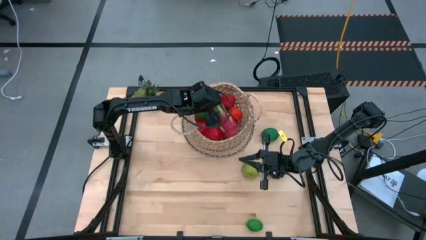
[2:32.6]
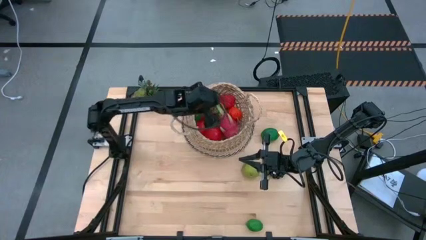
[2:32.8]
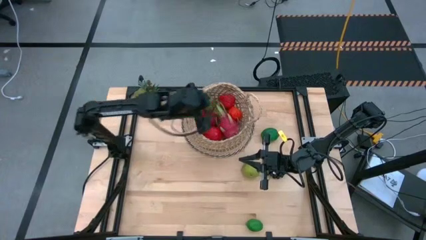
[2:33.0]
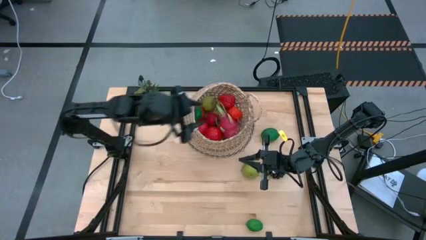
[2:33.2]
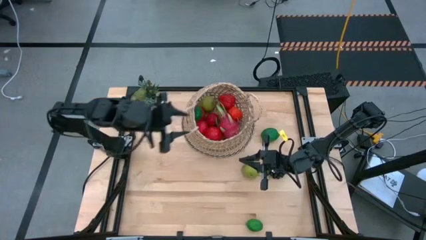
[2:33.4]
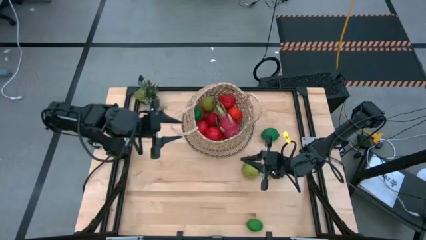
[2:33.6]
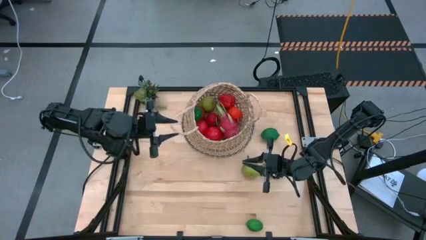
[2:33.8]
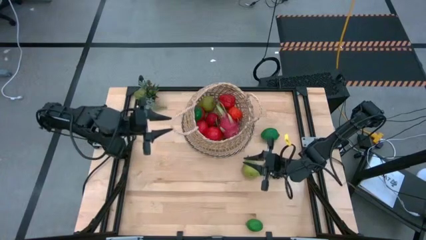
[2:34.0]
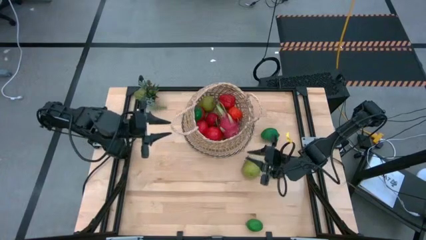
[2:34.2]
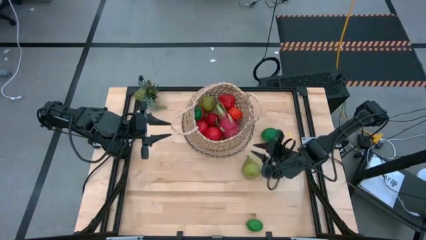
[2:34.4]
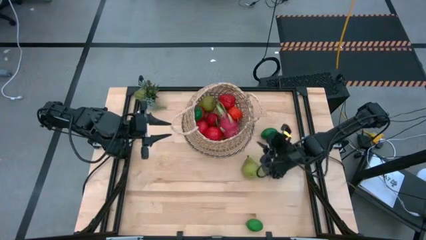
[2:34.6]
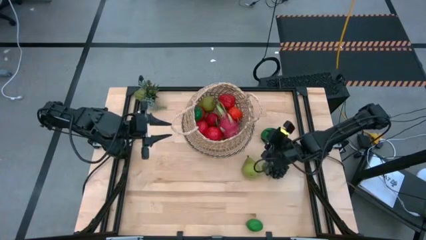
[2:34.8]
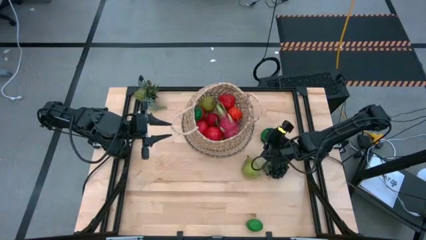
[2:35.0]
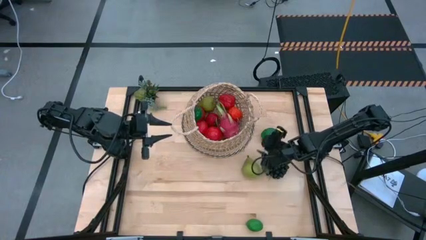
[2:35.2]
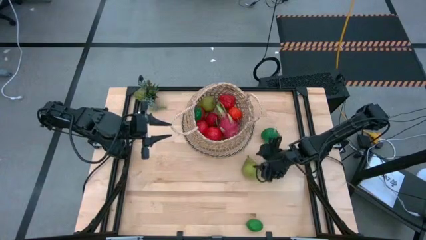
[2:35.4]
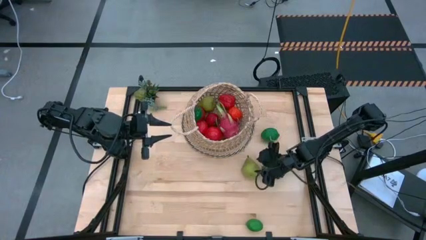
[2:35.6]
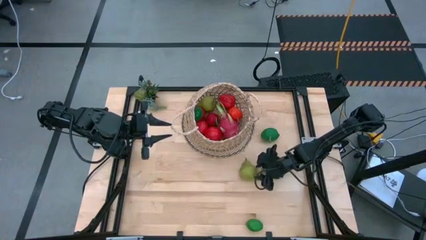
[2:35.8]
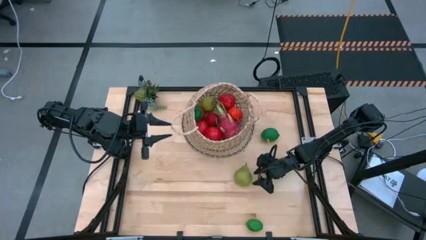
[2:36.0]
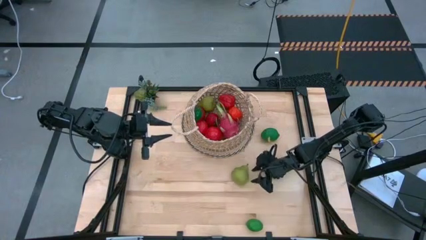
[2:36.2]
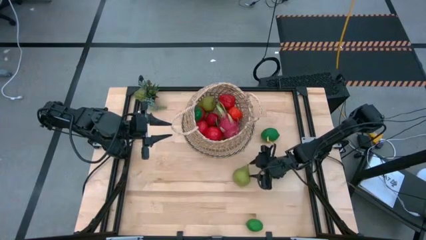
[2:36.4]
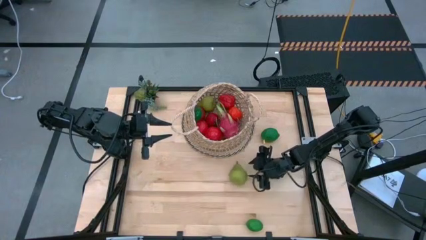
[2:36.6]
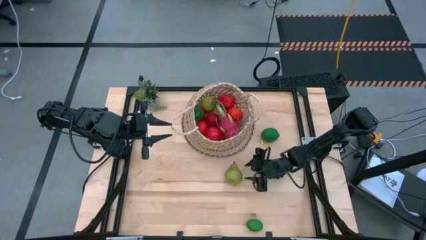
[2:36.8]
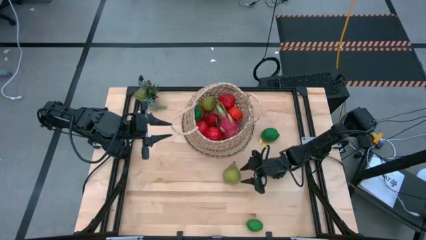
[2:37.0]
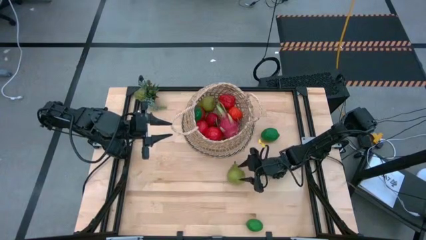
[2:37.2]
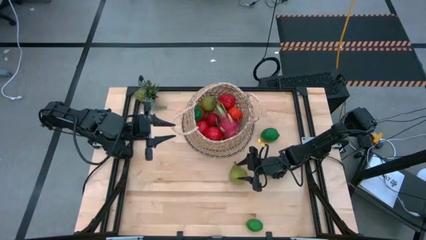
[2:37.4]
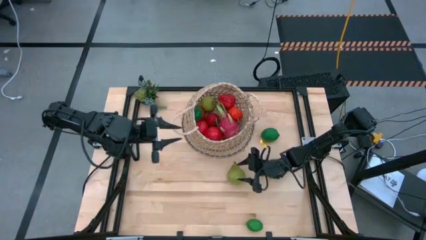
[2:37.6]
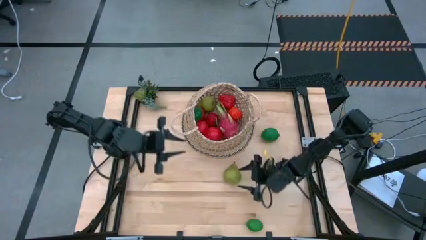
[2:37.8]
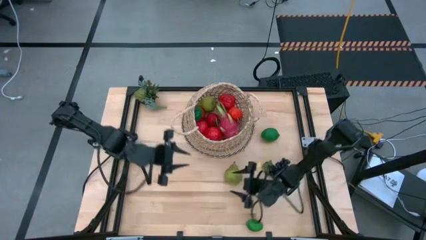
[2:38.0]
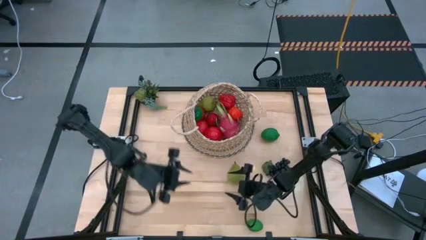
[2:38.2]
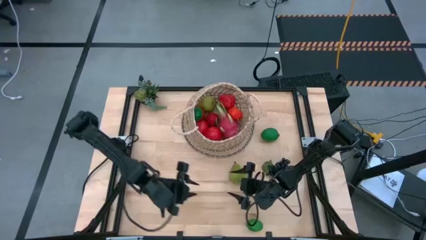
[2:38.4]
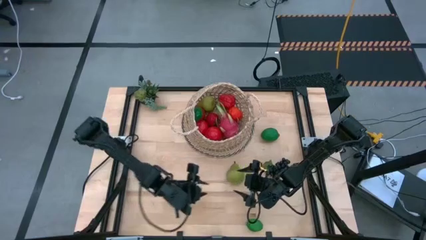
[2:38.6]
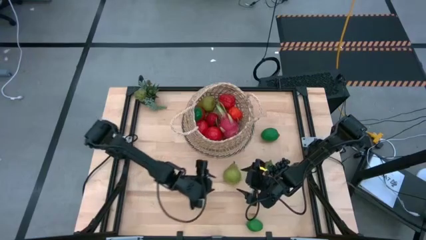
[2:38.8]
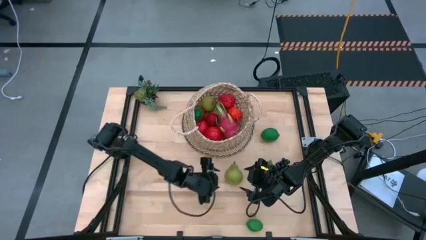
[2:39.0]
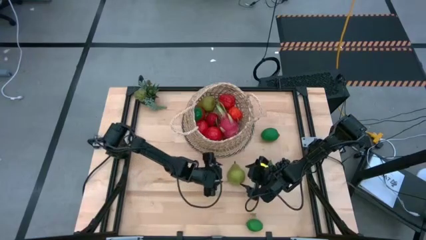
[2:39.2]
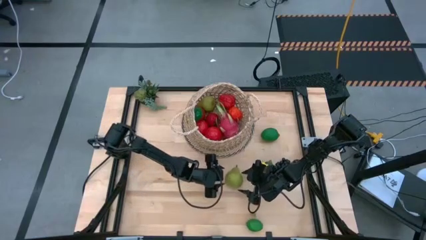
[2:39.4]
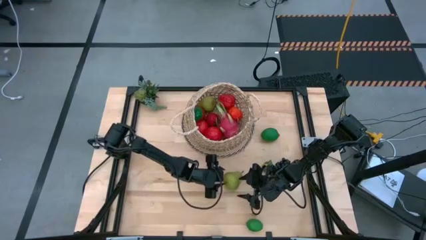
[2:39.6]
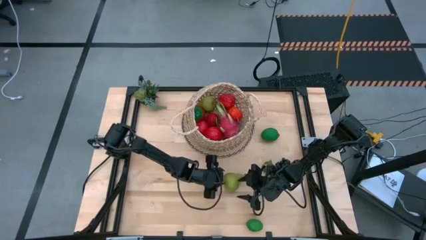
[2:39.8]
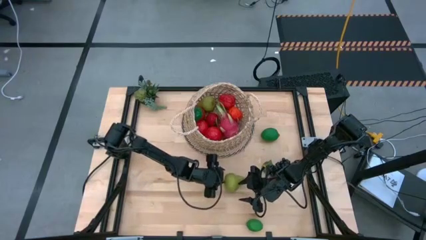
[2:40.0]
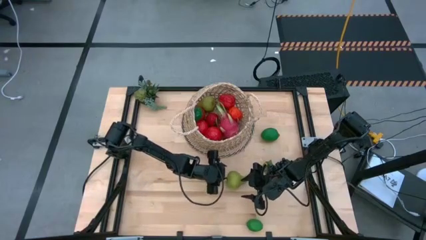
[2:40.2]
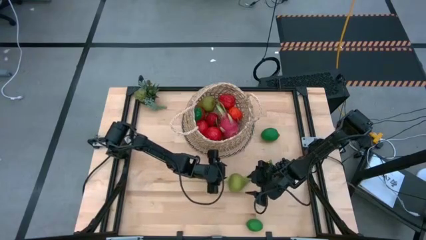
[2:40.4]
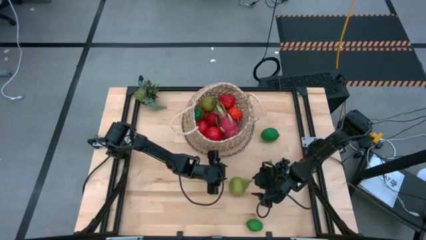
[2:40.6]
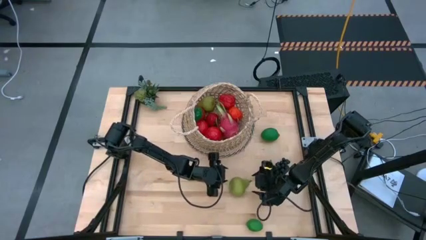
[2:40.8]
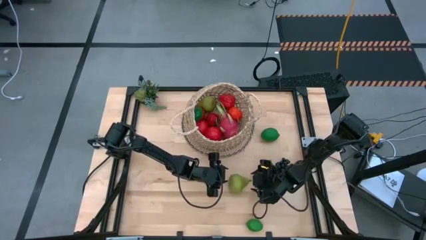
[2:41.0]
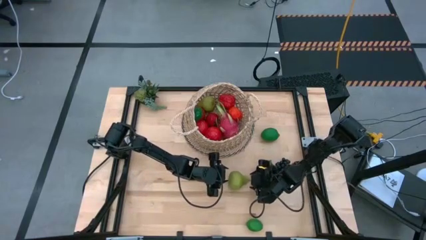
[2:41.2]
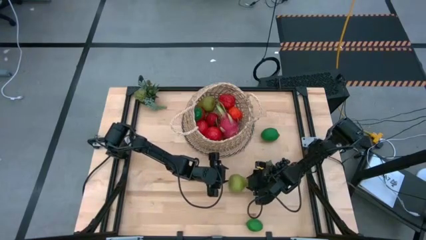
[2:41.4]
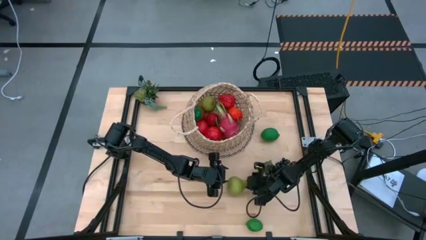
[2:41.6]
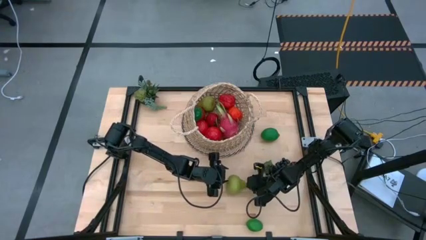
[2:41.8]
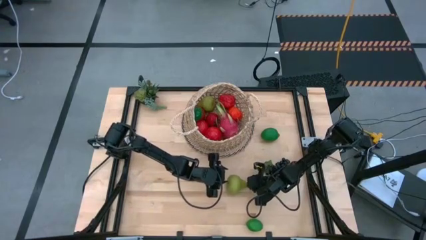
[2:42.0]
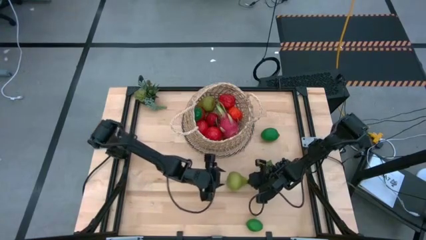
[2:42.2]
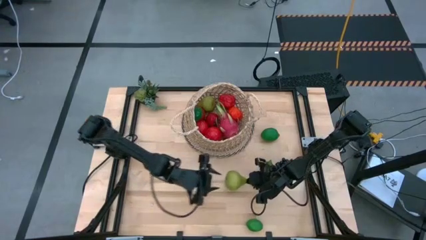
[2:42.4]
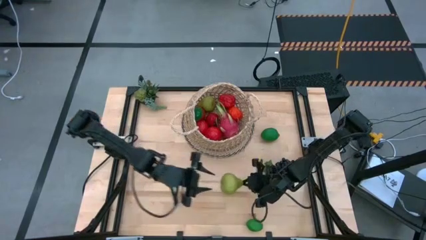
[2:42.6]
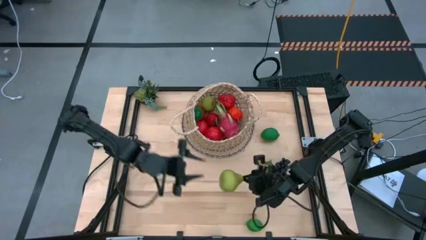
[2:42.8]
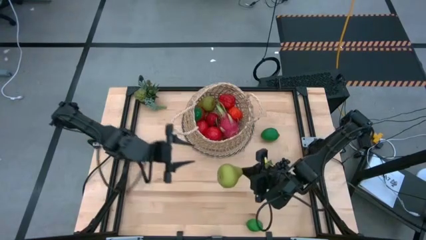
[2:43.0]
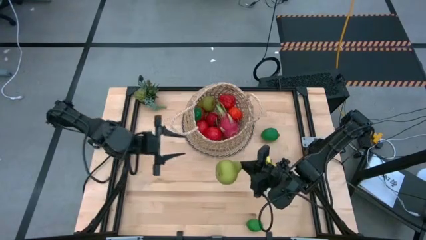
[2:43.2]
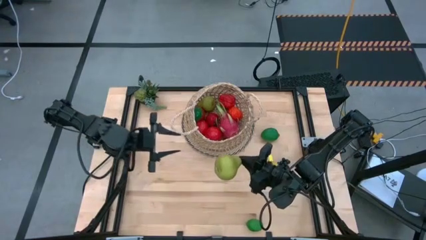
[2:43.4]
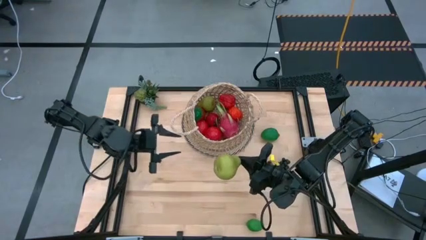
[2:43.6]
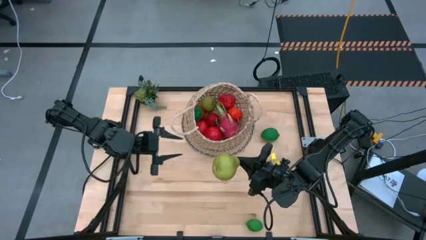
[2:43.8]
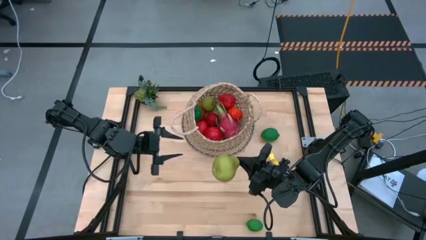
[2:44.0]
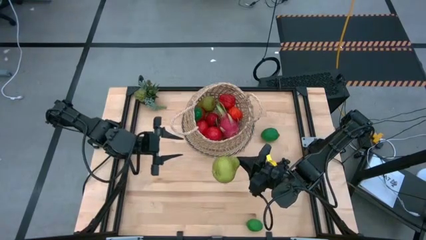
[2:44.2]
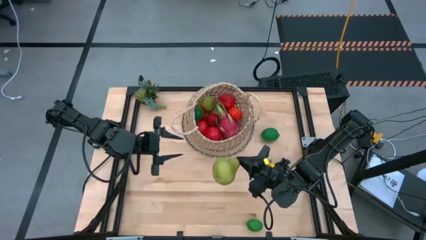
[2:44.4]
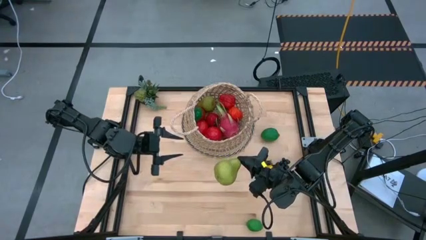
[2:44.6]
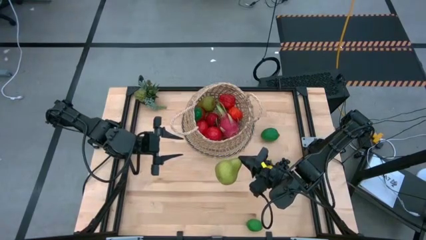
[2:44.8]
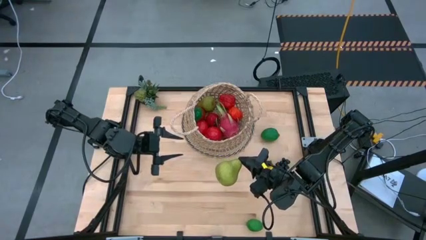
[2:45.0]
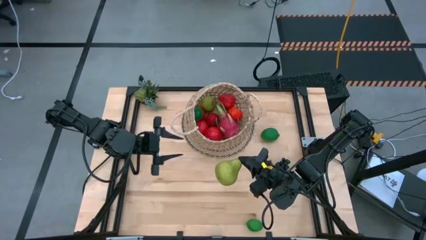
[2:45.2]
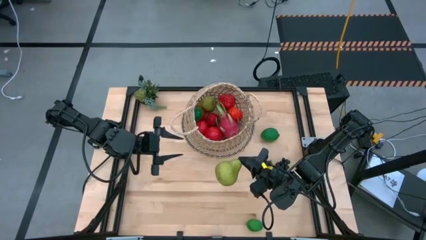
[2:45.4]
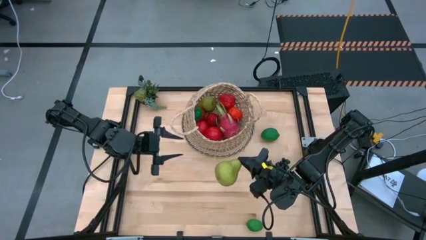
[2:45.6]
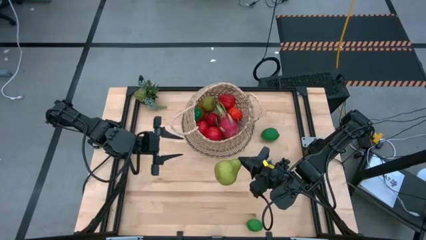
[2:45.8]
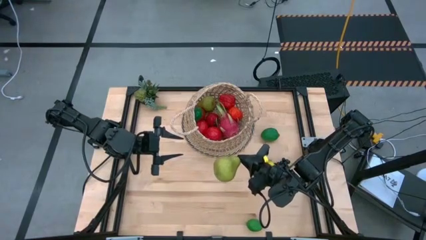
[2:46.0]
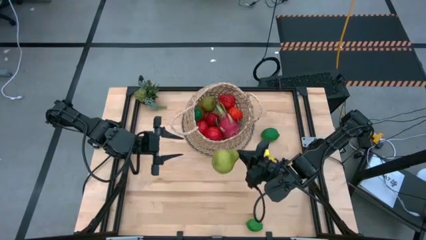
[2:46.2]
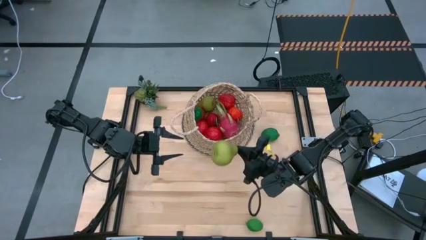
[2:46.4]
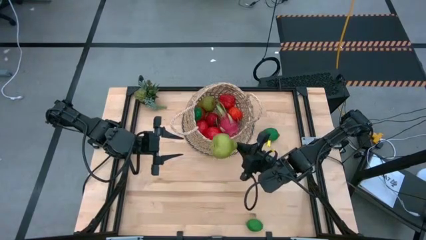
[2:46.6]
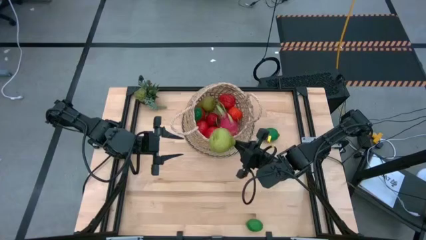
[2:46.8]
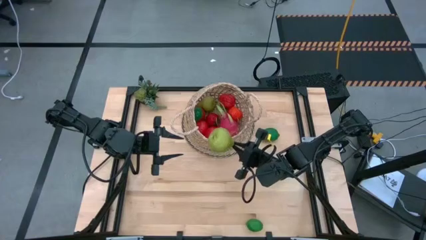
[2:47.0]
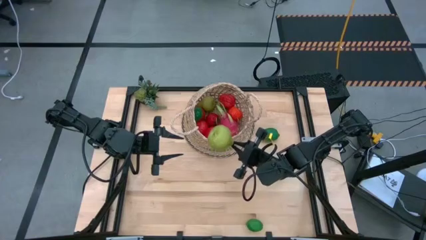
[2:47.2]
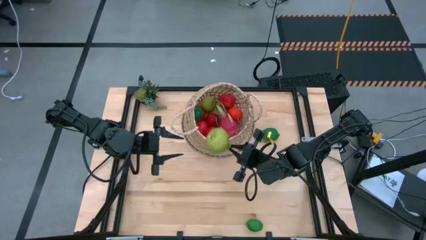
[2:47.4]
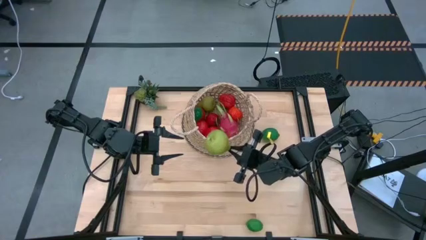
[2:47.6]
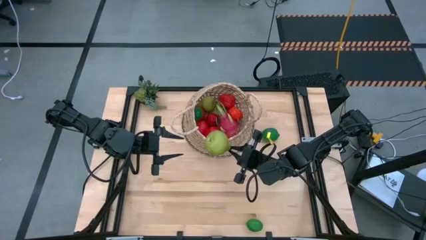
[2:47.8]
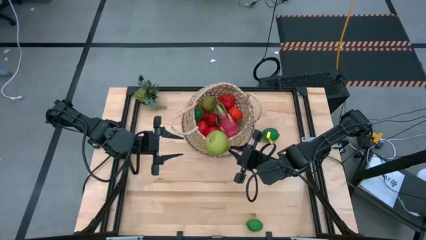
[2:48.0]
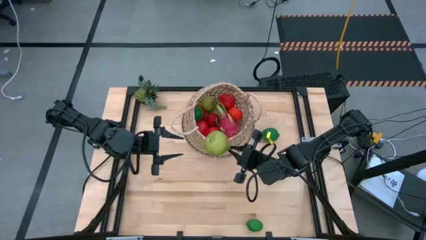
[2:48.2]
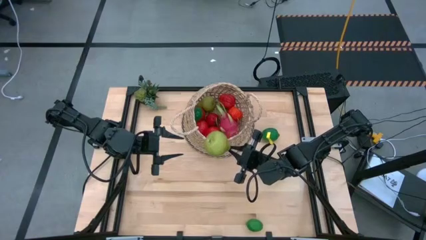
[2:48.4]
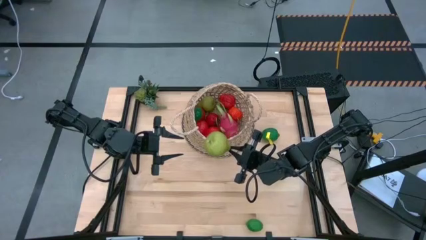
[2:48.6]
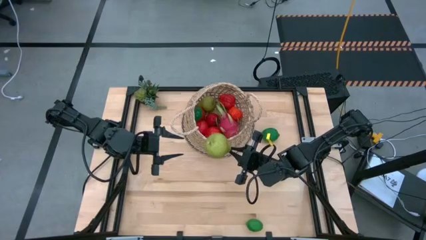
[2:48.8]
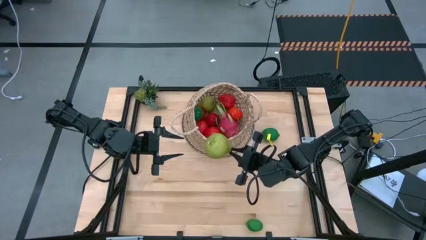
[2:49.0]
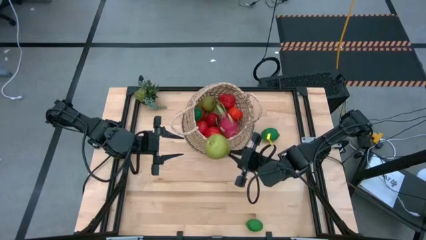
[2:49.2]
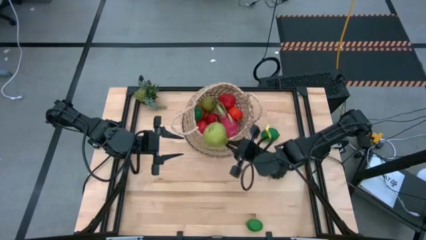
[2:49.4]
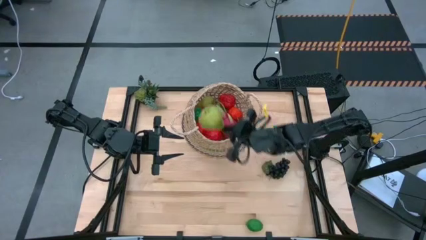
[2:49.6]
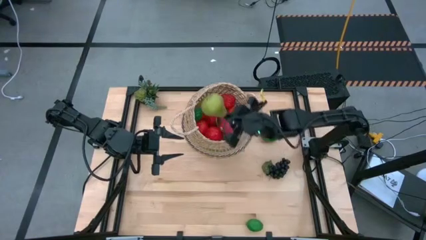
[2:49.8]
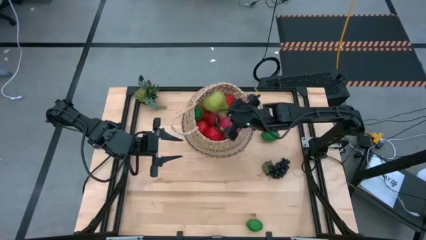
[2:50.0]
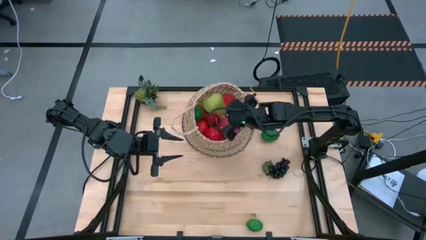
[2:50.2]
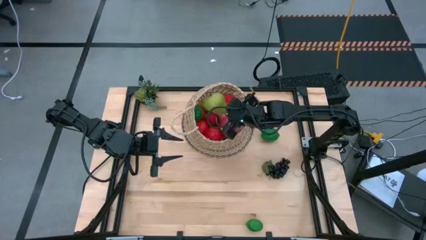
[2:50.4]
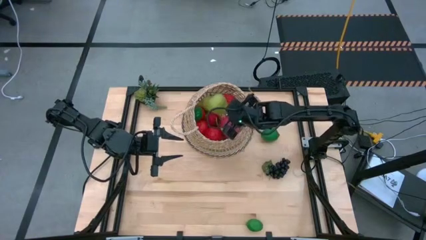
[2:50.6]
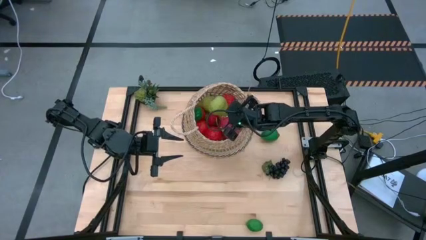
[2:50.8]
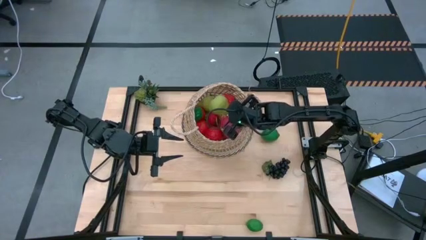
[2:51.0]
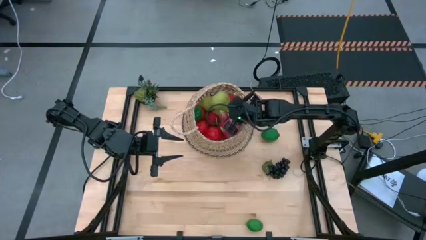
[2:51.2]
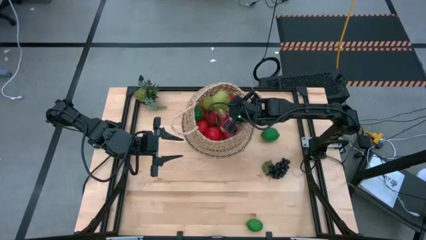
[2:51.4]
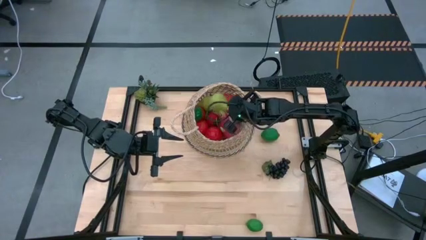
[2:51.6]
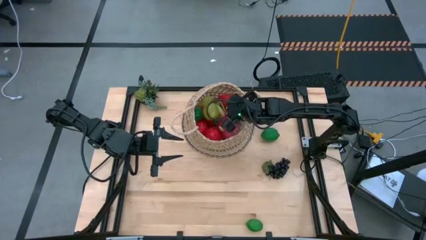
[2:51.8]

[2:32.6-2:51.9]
Task: Build produce basket
Put the green pear into the basket
